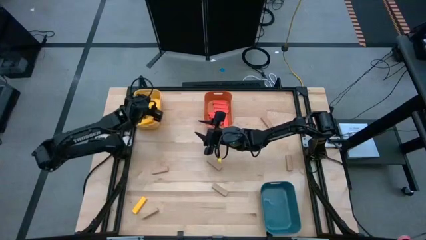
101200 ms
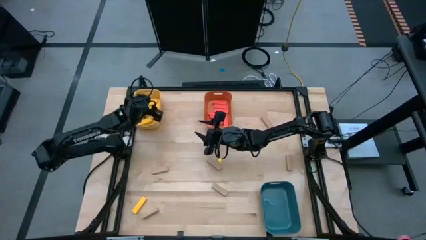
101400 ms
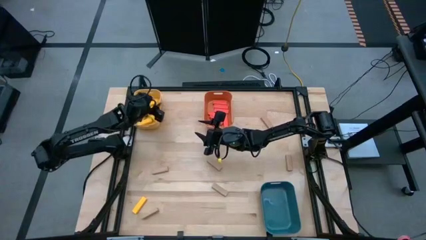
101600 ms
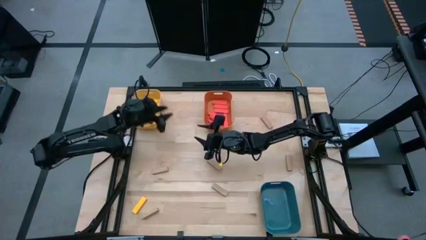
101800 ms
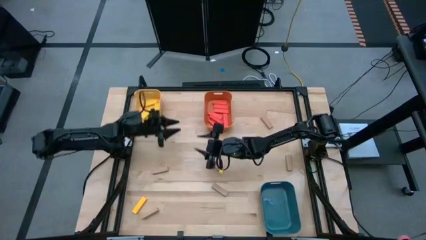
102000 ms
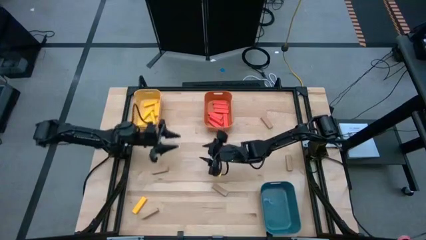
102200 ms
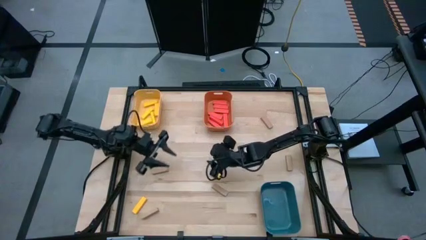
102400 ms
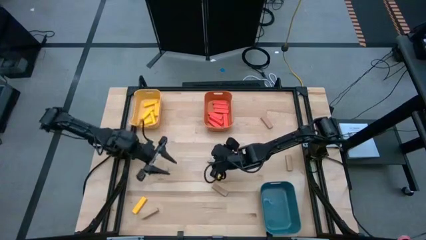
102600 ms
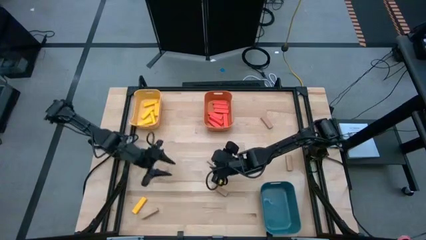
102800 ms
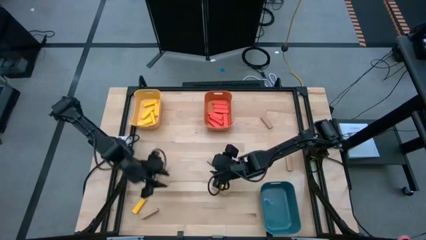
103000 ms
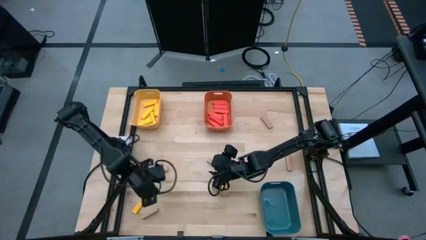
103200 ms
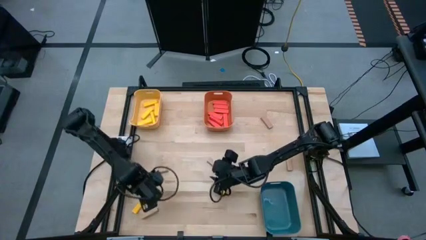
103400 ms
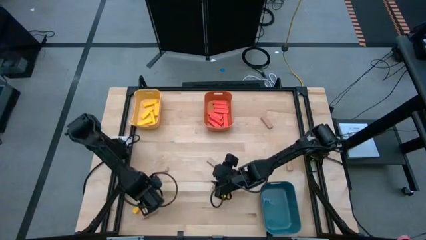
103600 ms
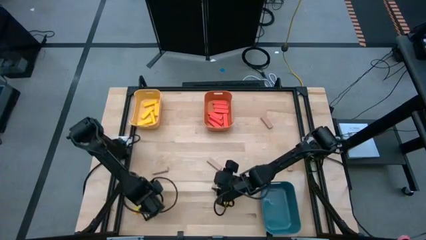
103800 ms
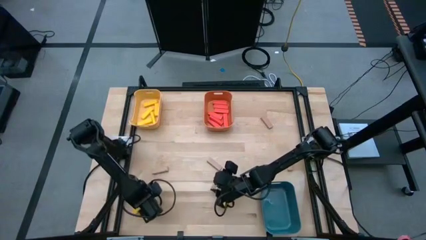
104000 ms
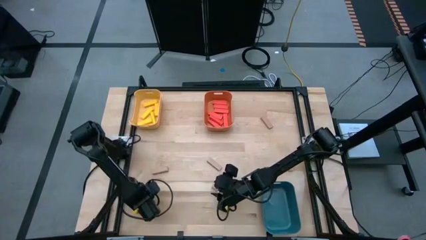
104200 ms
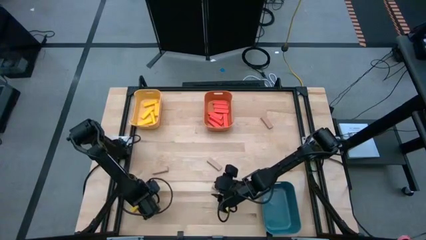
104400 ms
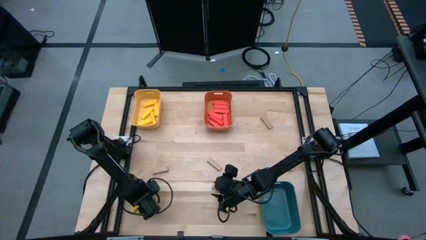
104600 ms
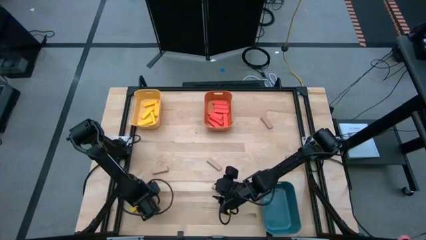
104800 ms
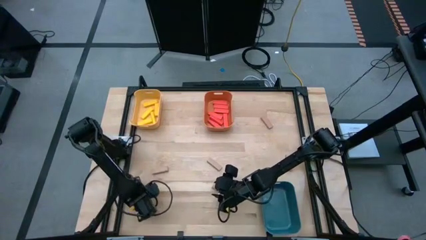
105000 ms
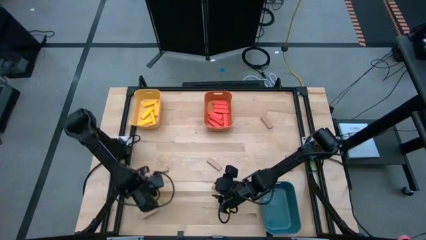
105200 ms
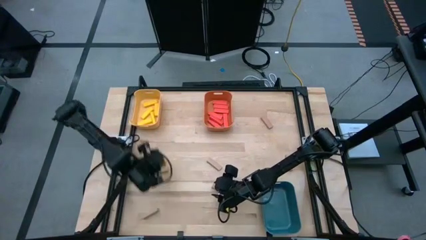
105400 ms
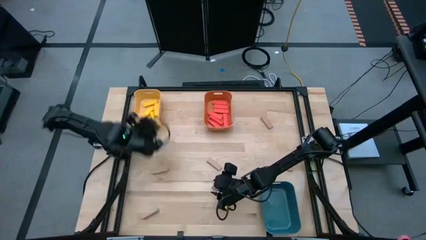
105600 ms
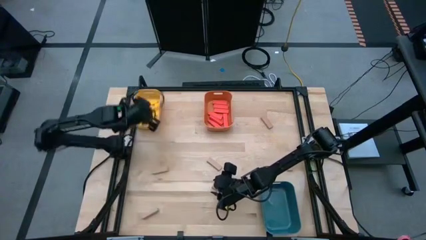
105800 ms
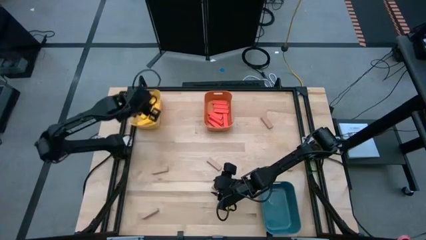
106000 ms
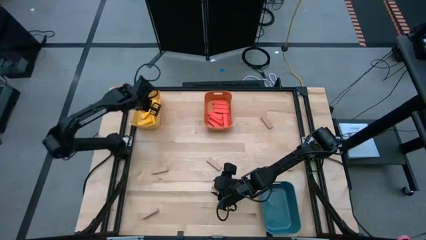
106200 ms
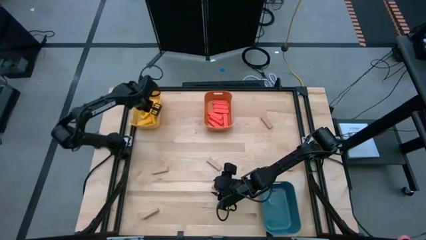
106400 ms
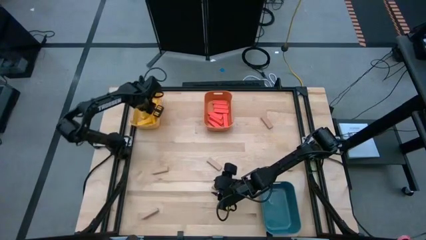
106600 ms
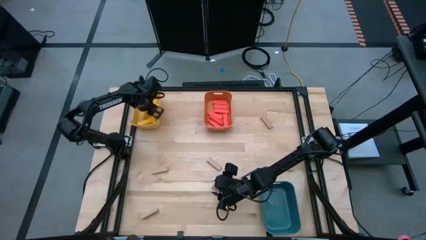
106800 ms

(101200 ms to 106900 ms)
Task: Sort blocks
Put the yellow block into the yellow bin

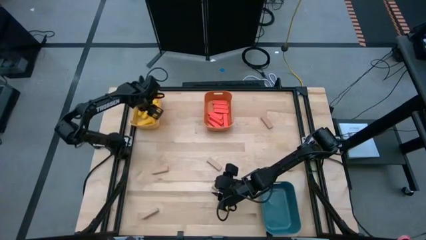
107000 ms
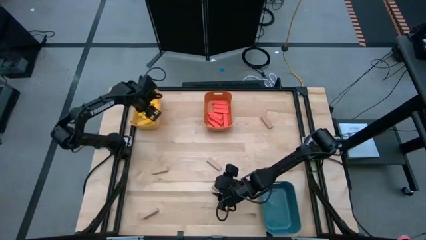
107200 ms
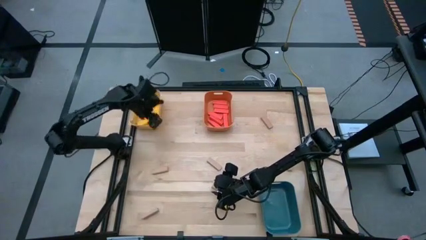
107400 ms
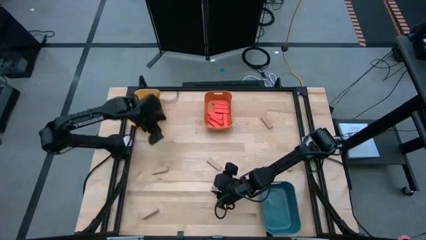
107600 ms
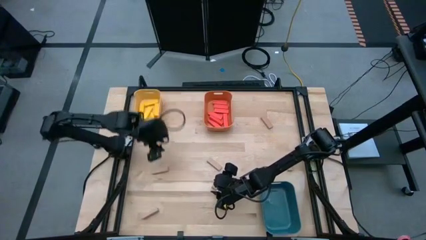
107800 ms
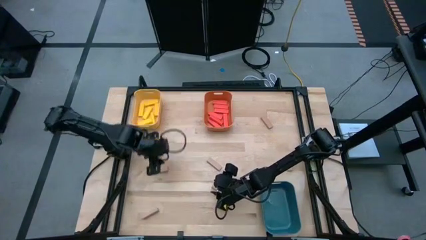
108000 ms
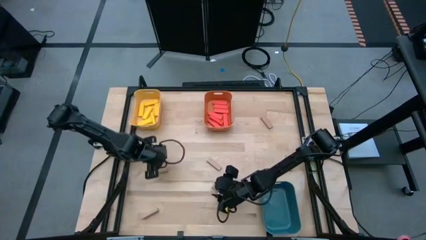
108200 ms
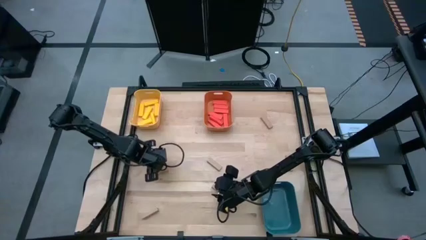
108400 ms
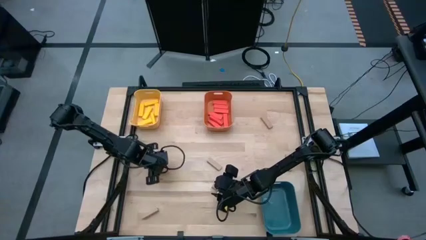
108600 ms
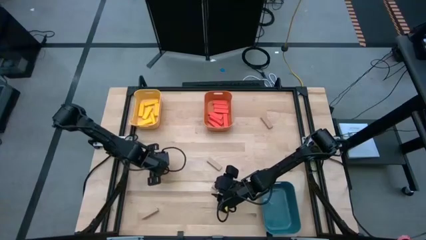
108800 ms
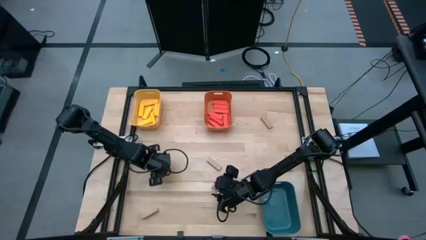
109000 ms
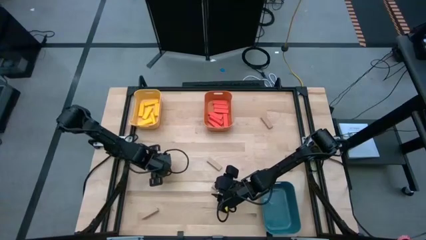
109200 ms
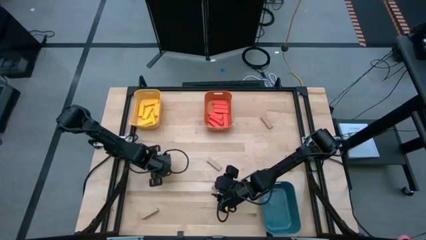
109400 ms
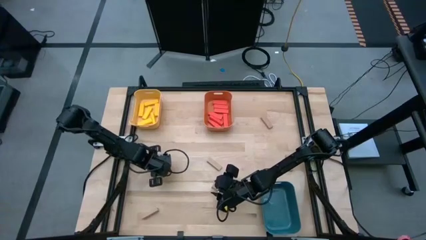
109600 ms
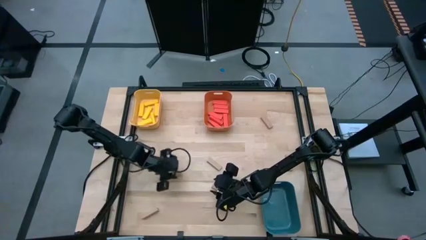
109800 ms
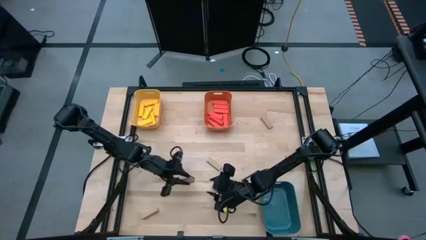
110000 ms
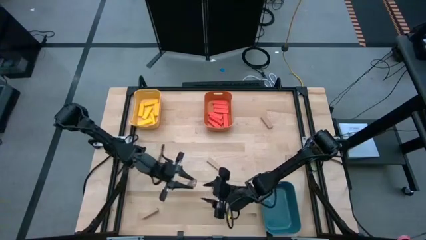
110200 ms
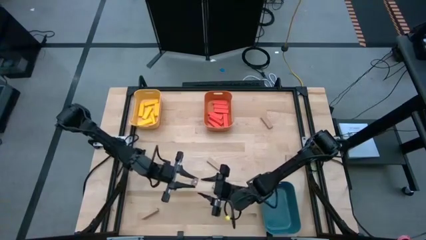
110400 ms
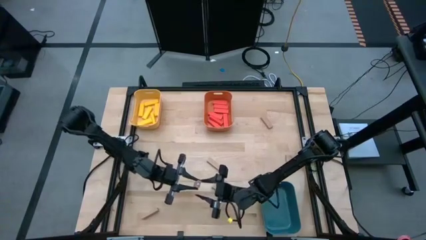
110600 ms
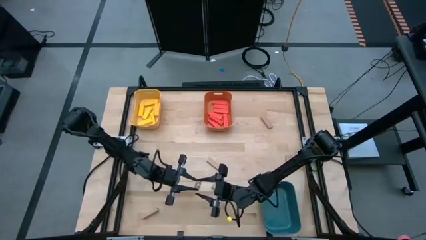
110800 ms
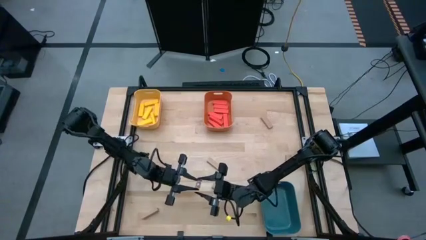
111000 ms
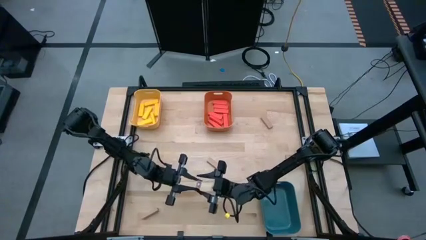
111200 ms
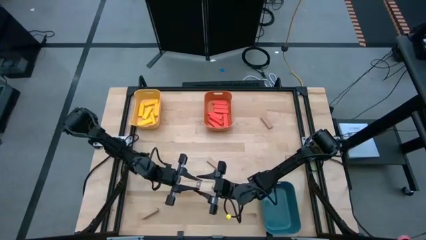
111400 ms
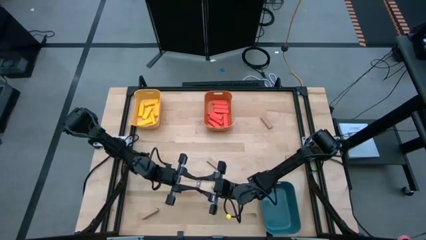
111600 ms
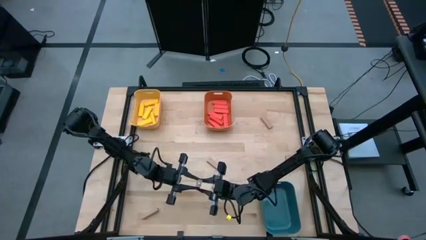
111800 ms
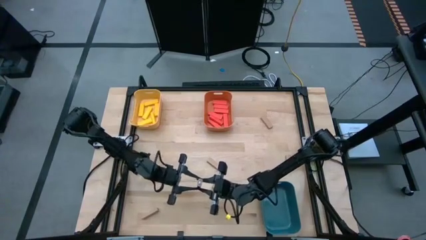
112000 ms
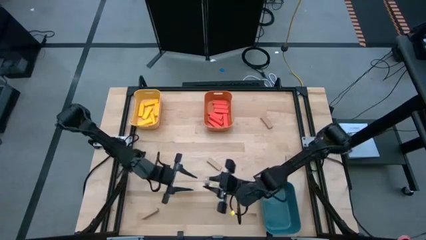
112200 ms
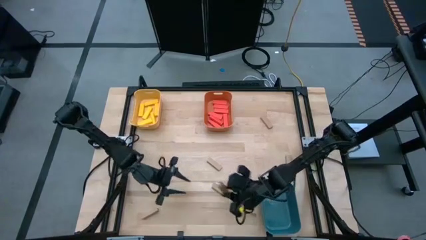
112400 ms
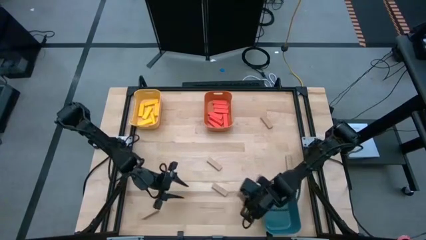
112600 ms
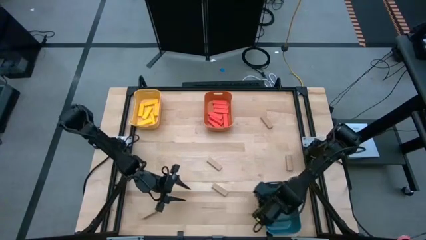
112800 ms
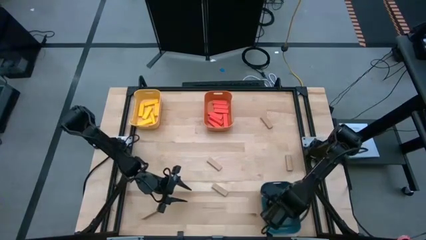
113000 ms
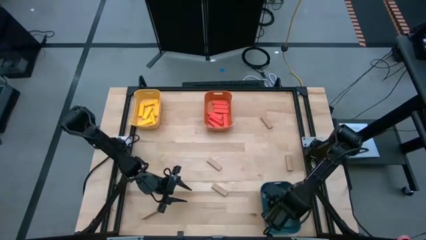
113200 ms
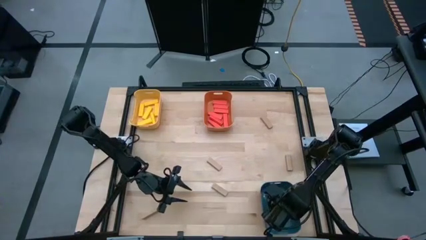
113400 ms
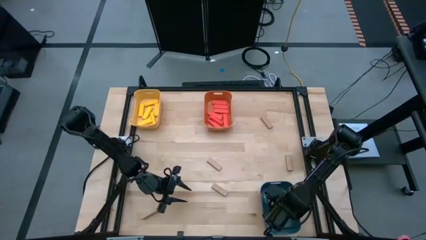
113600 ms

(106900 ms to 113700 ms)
Put the brown block into the blue bin

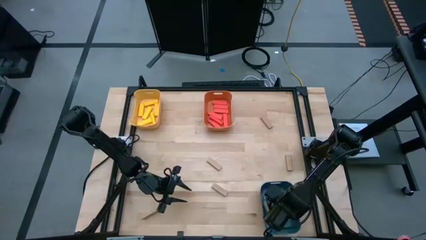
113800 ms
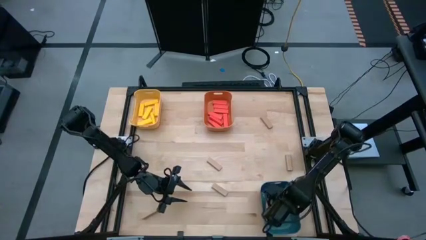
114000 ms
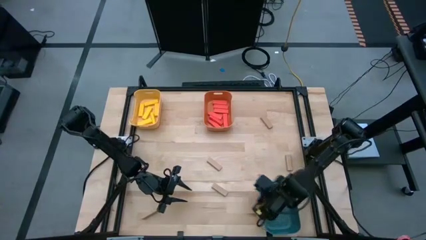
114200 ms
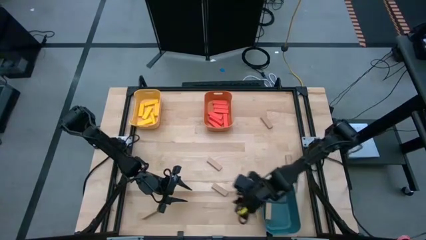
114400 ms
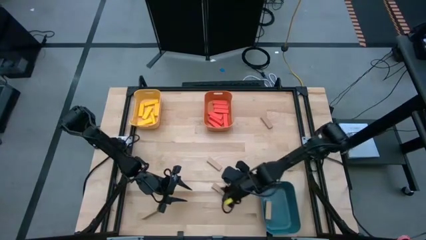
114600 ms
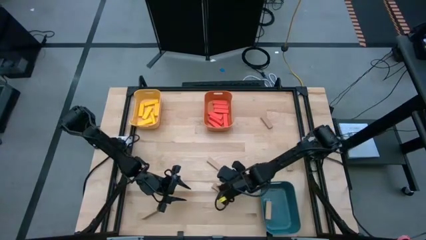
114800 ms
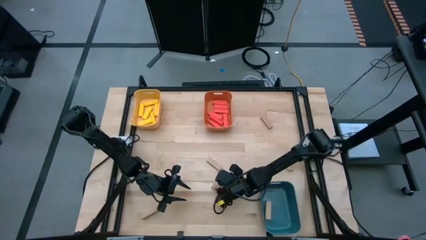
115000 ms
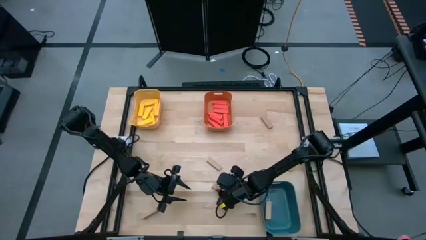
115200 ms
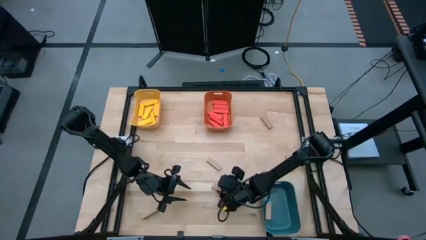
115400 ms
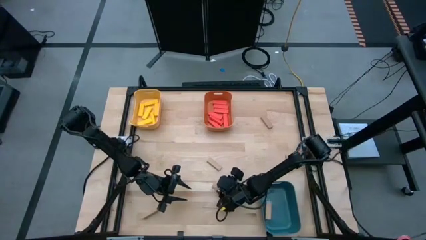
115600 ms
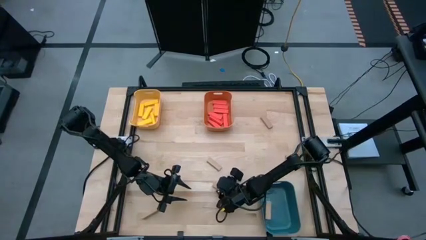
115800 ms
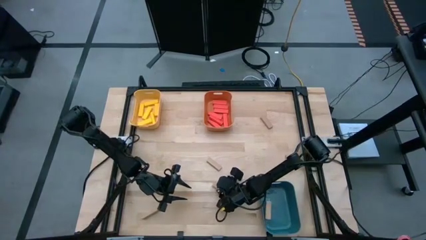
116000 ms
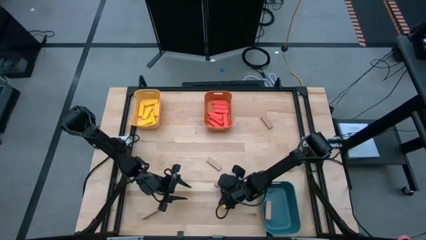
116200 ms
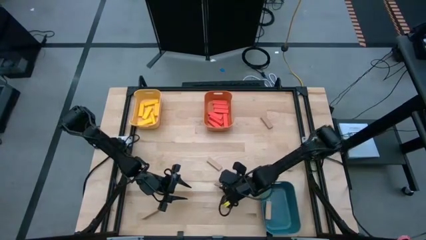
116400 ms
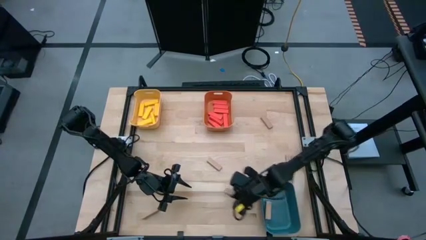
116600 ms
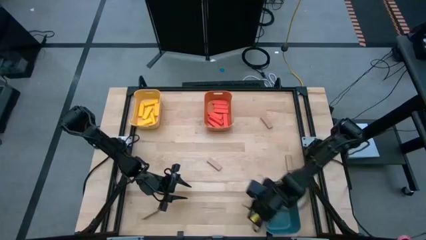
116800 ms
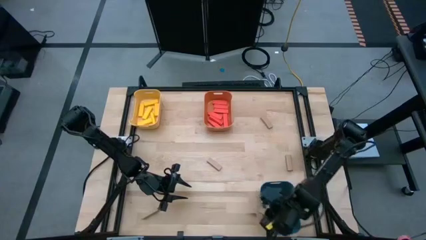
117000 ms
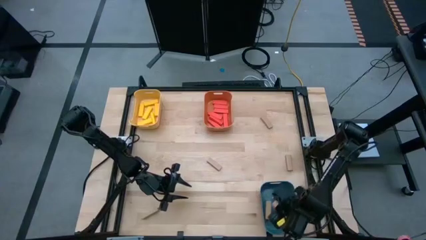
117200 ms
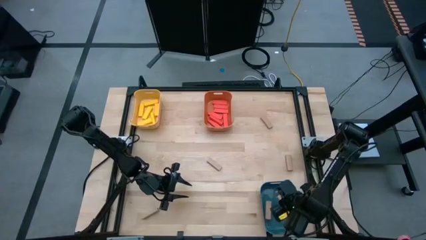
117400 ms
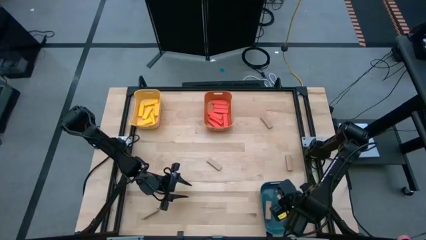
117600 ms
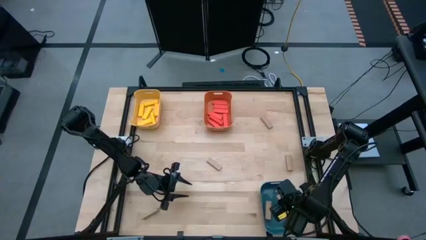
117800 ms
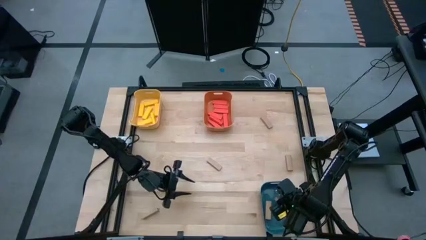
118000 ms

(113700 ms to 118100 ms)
Put the brown block into the blue bin
